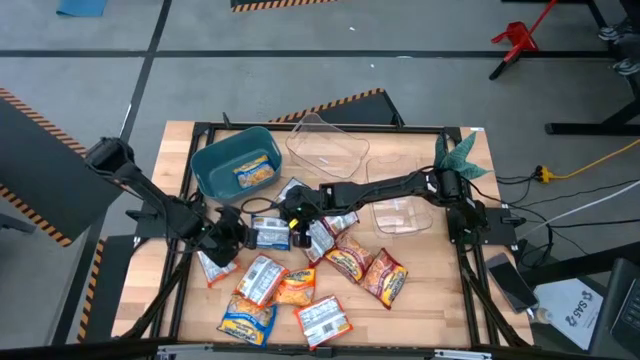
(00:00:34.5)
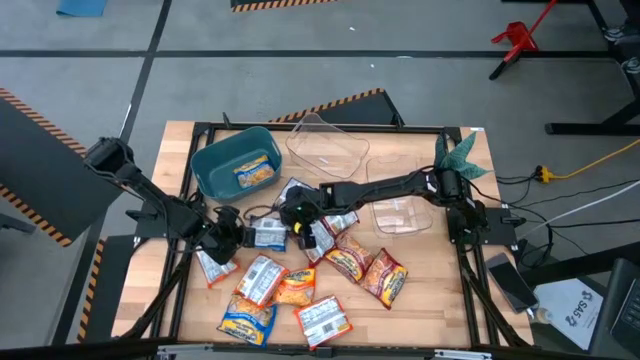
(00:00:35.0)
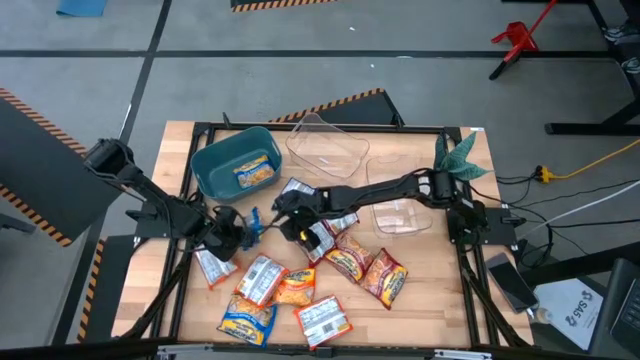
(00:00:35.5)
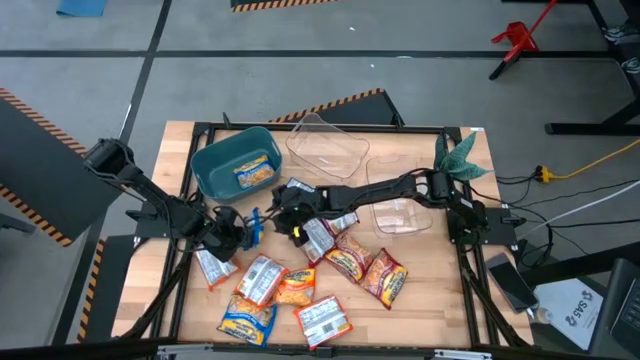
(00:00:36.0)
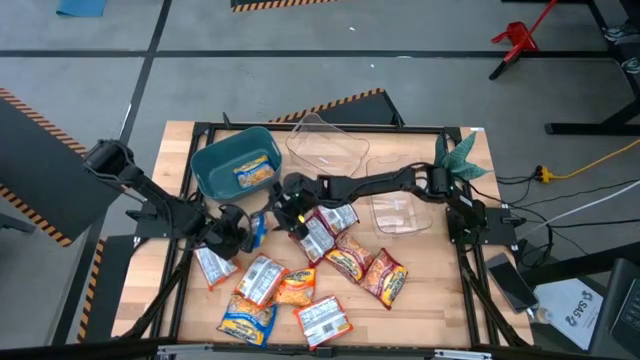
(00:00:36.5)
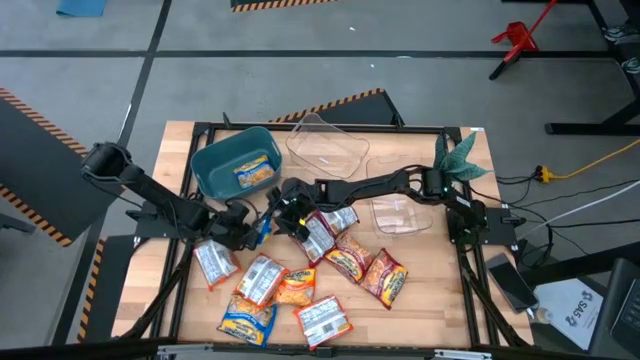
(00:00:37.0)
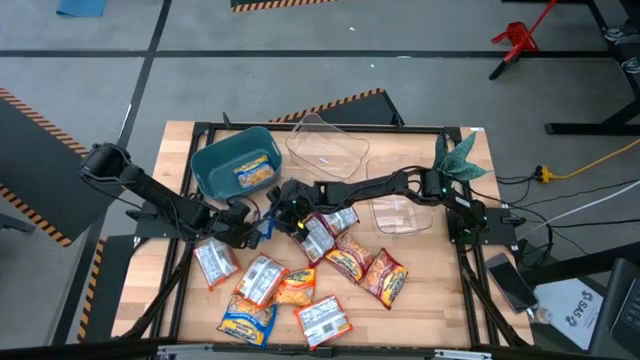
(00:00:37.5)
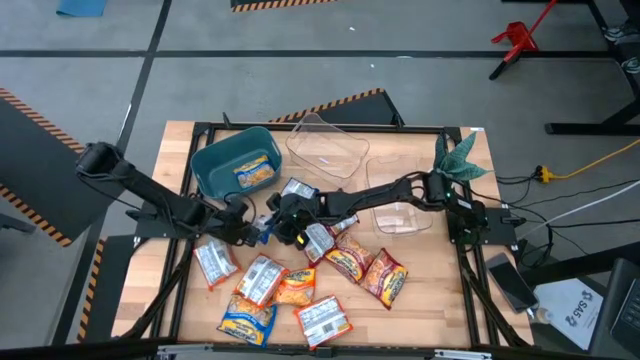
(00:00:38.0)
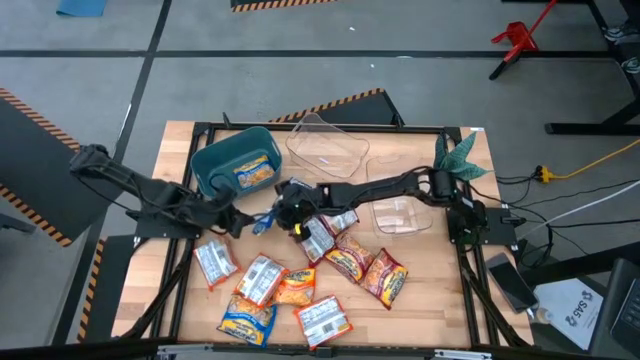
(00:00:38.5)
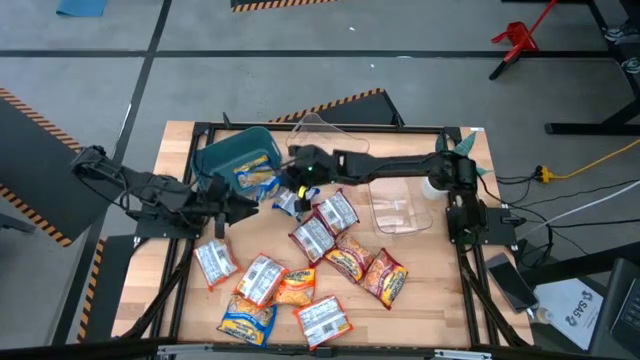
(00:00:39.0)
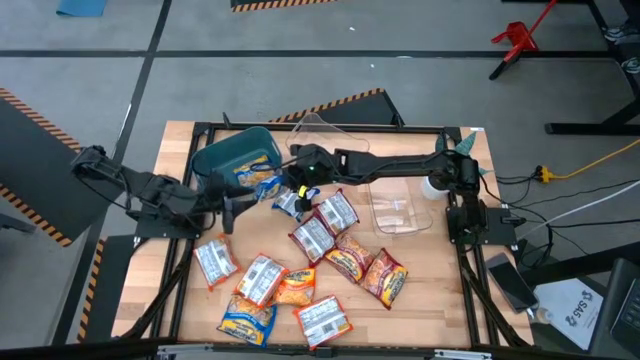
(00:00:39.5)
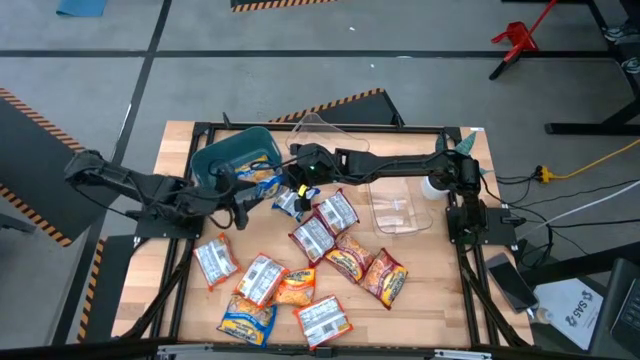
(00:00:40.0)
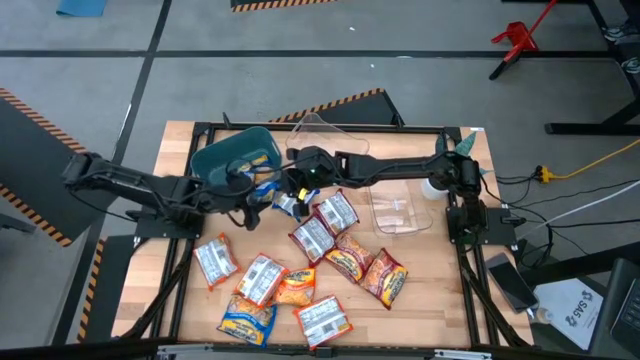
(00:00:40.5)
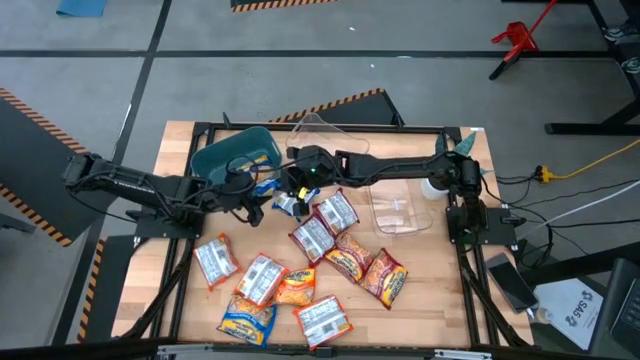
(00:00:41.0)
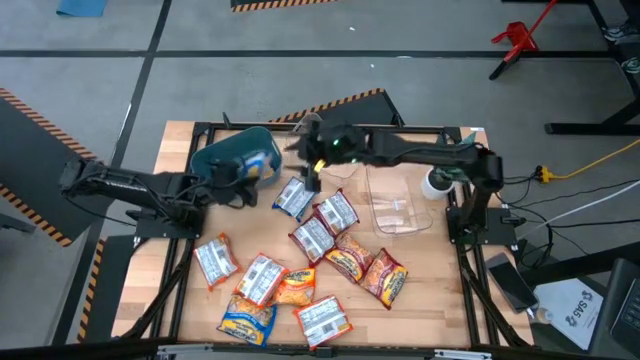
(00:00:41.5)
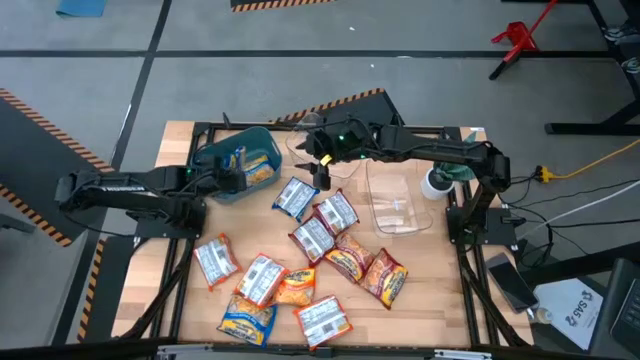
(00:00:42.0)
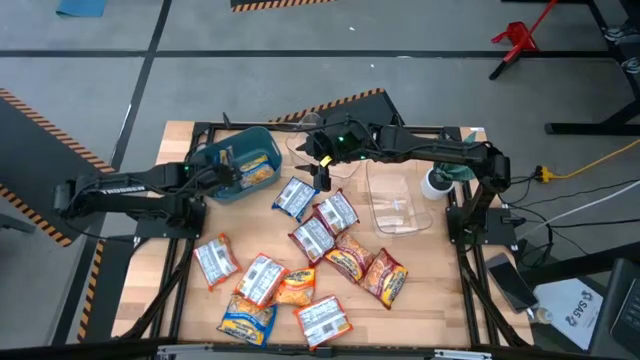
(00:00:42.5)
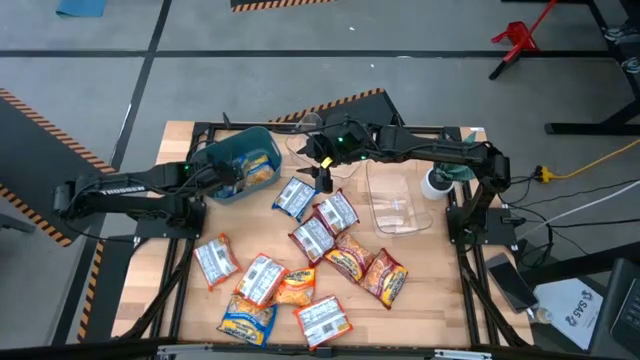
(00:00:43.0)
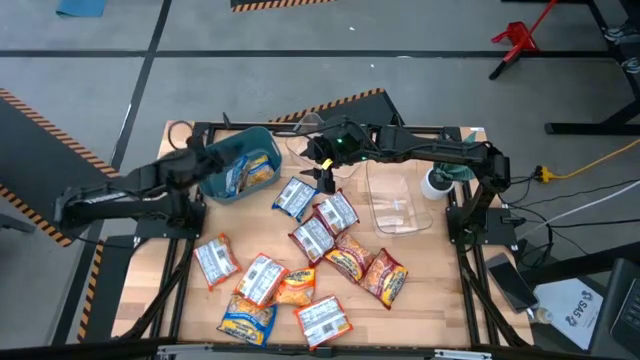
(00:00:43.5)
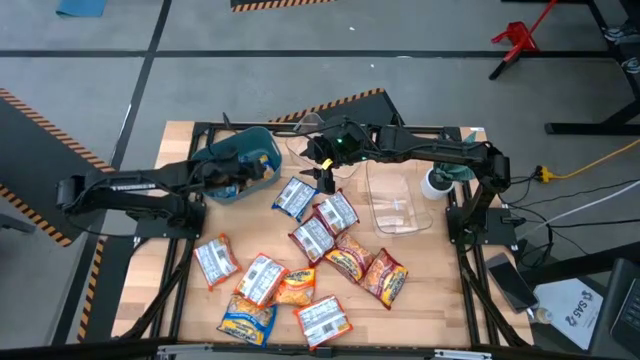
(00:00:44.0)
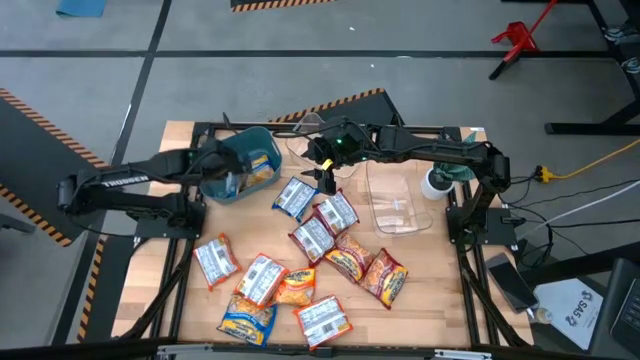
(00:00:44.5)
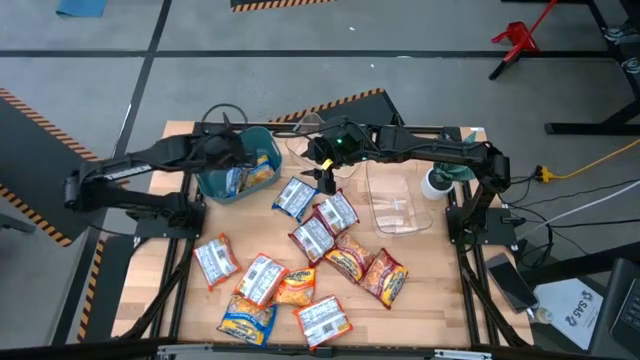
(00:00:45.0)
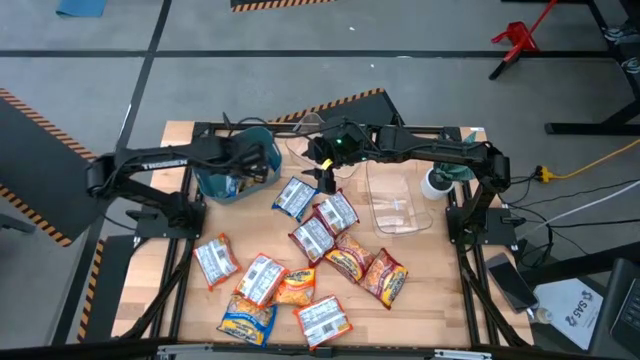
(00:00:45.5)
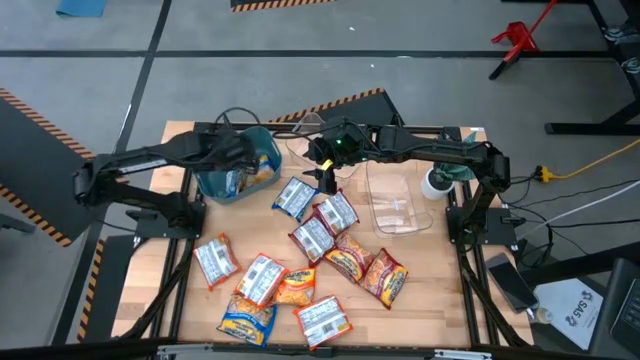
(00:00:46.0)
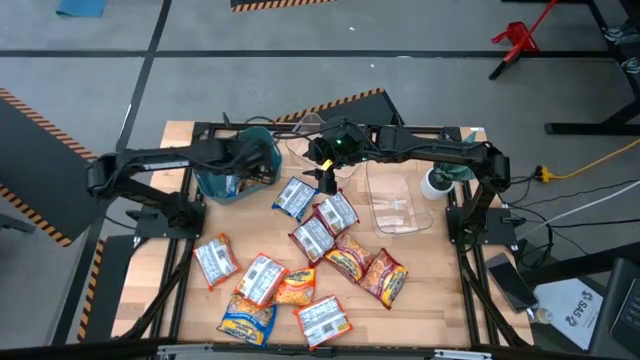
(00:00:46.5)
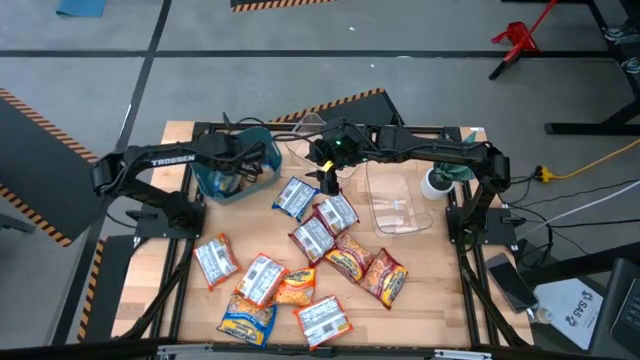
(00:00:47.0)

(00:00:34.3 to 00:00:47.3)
Task: Sort Maruchan noodles
Put the blue noodle pack into the blue bin

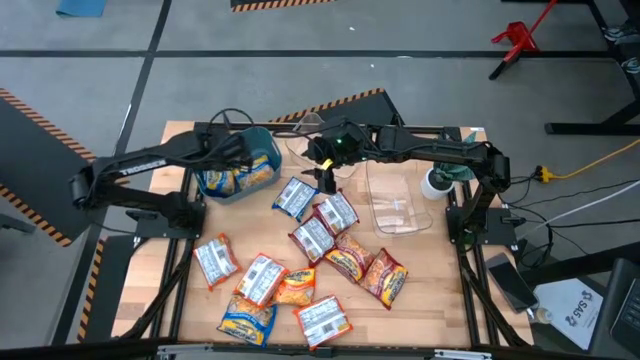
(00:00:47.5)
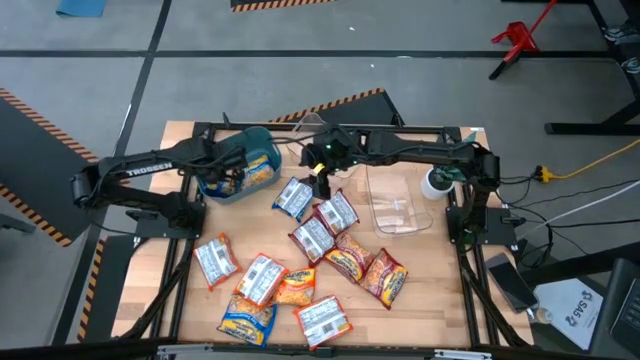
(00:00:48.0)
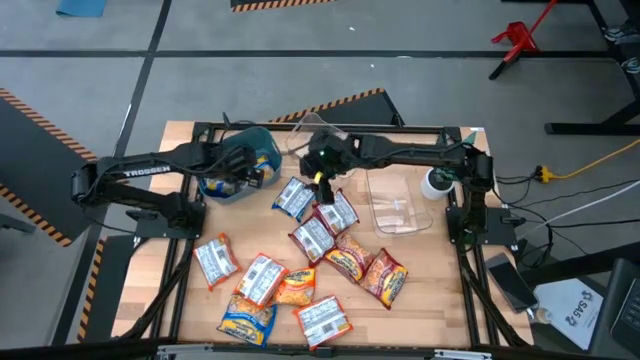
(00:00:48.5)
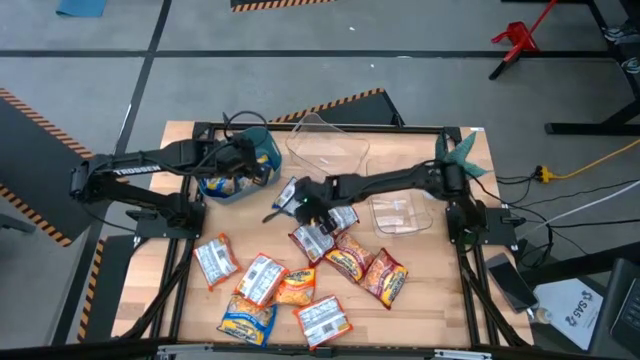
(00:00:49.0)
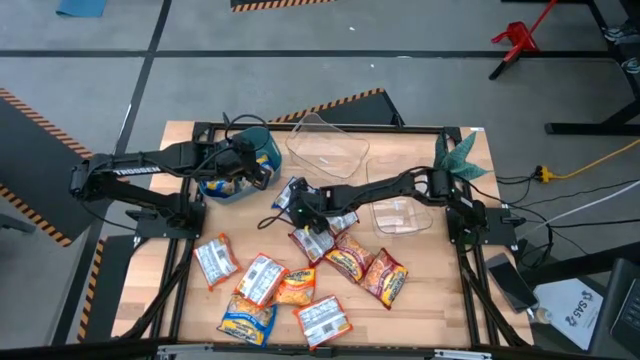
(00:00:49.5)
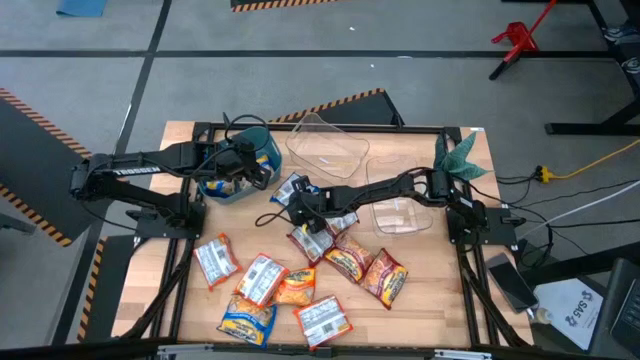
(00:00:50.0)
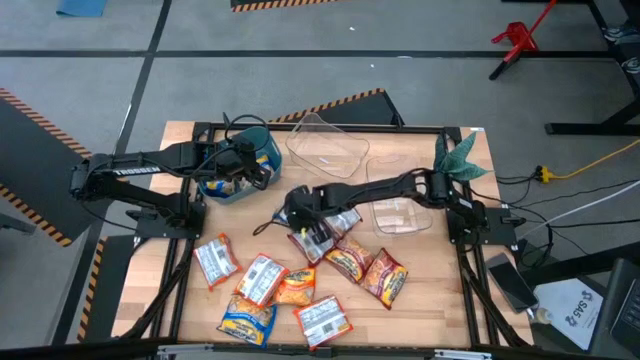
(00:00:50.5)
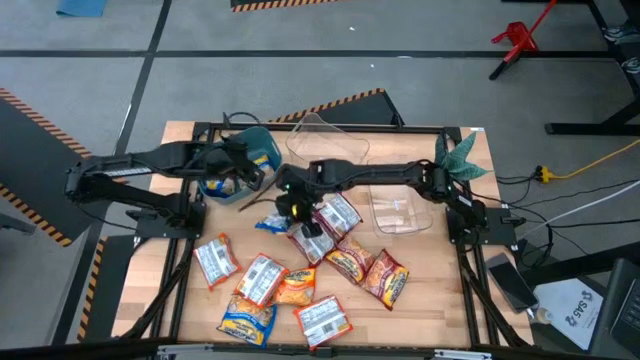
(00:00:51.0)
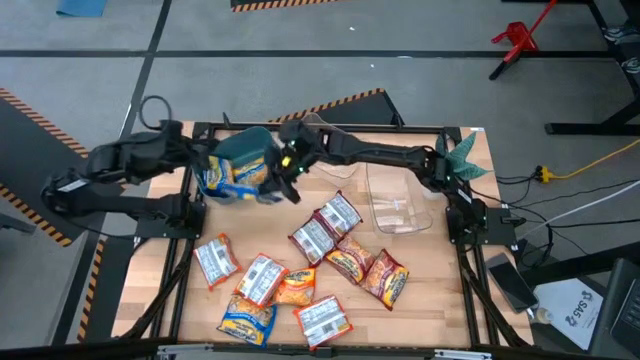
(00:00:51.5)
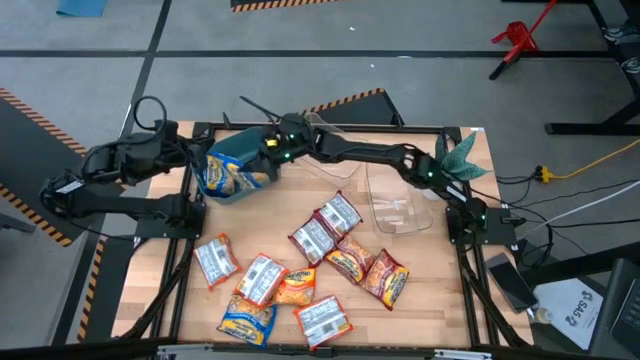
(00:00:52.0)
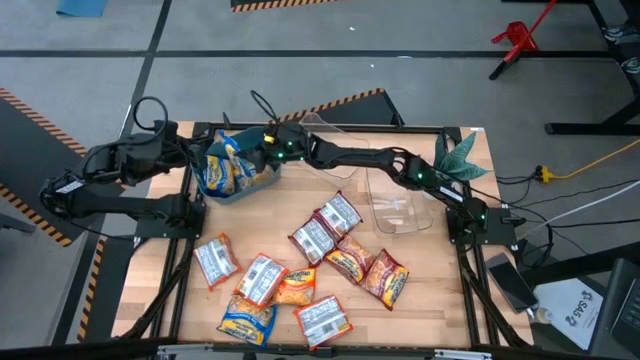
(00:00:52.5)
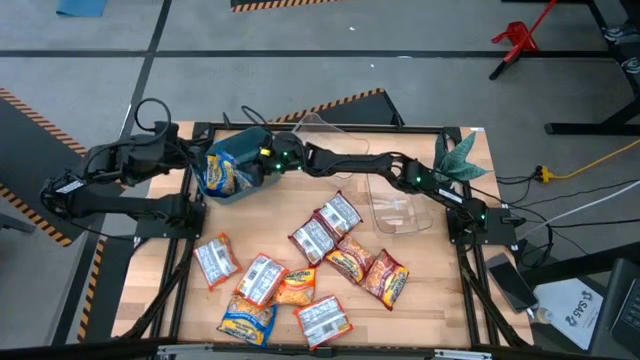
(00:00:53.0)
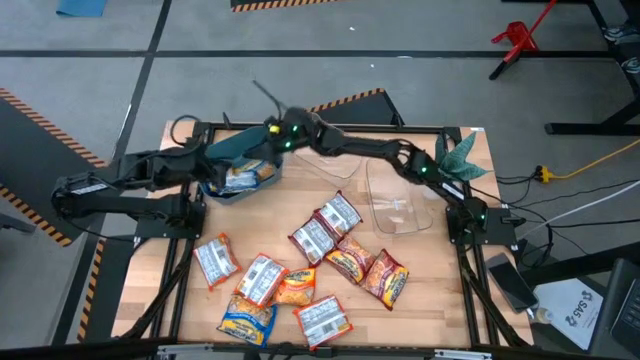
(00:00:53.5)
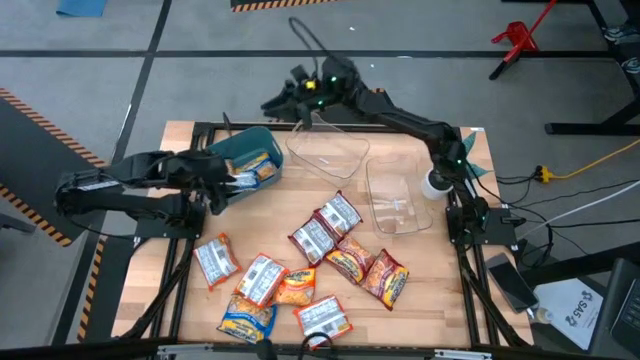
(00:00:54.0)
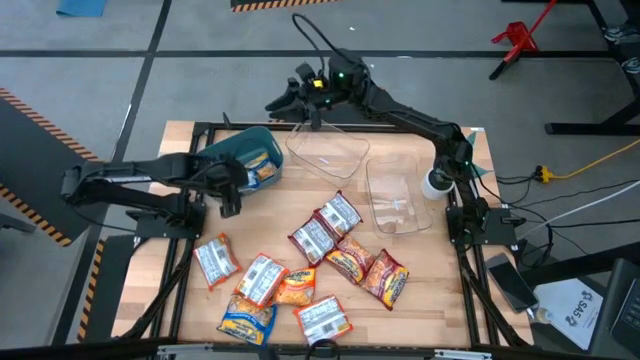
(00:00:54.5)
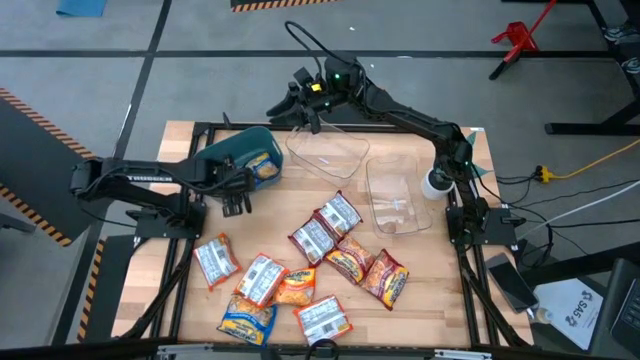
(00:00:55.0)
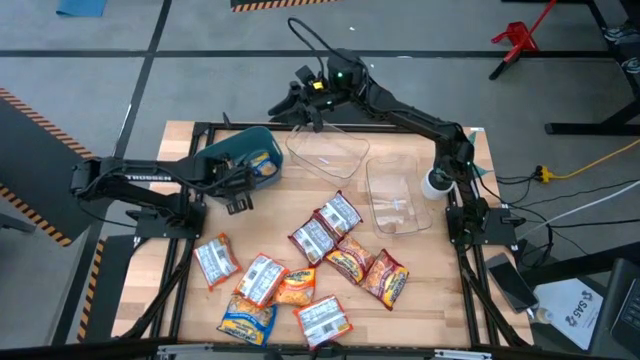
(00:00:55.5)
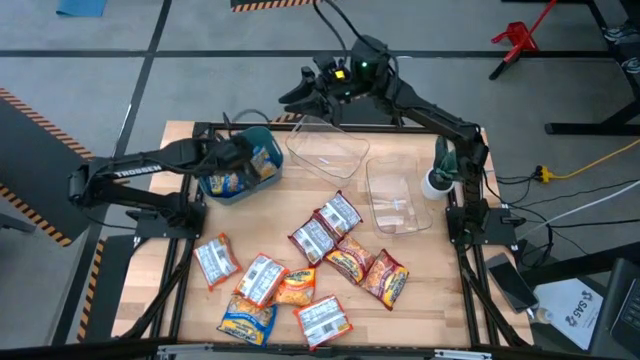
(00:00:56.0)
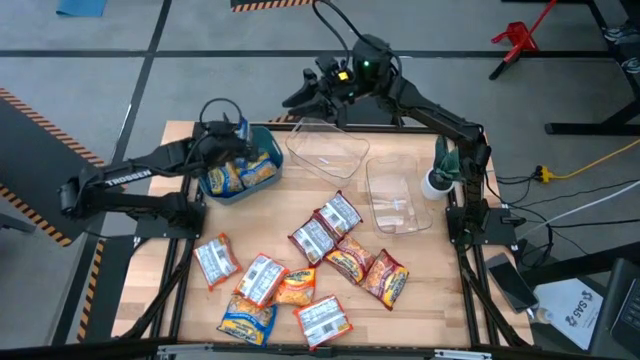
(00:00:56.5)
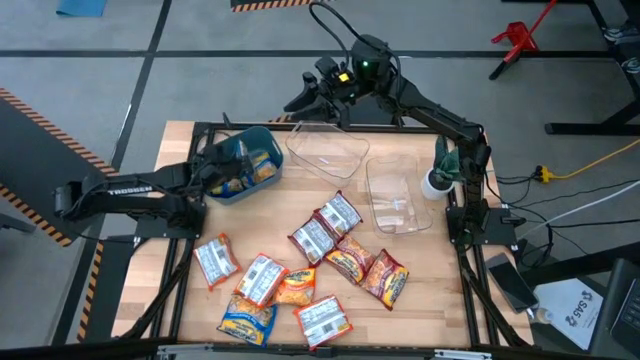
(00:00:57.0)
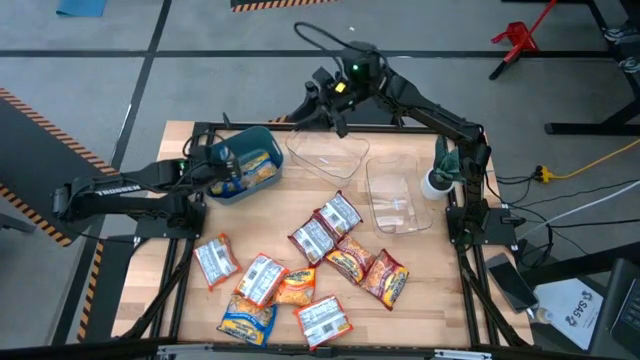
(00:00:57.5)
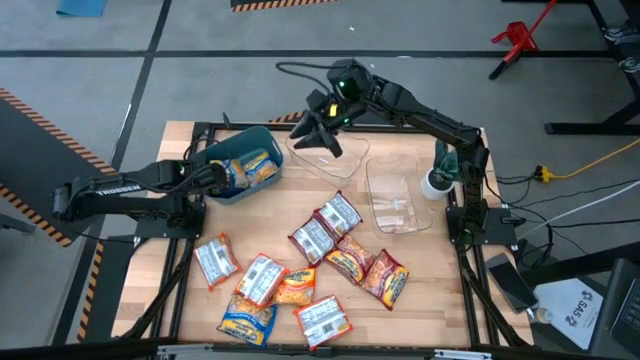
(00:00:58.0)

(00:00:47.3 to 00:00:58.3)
Put the blue noodle pack into the blue bin
